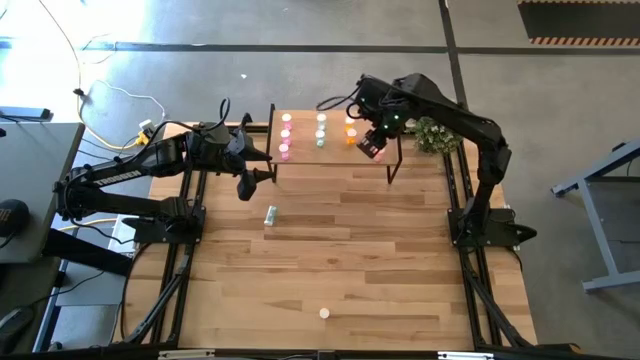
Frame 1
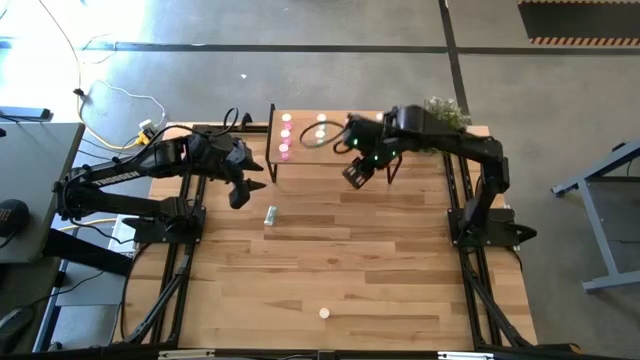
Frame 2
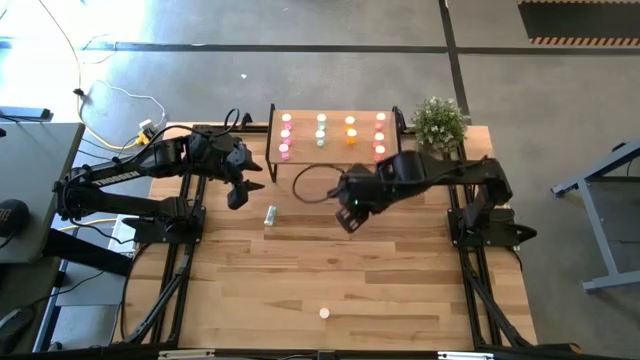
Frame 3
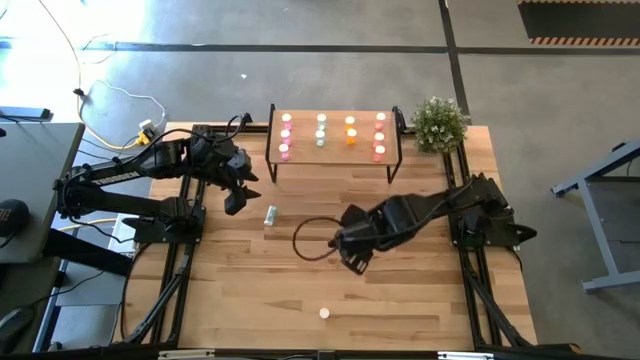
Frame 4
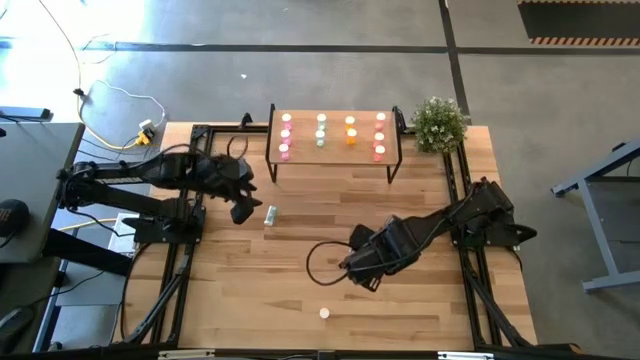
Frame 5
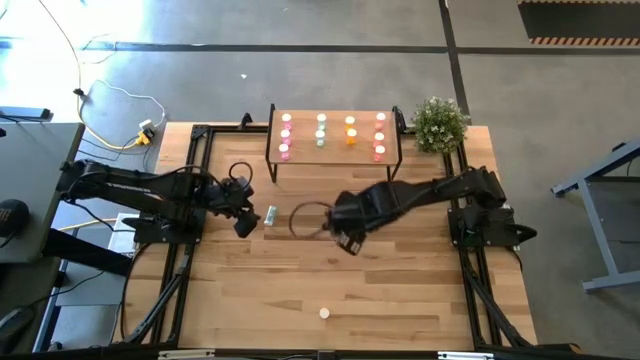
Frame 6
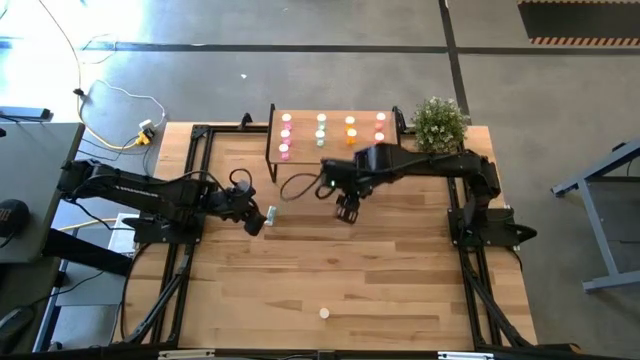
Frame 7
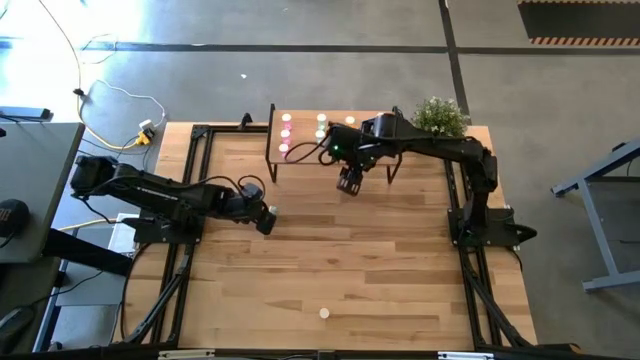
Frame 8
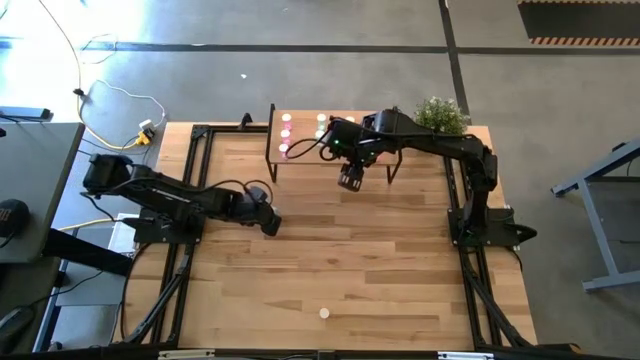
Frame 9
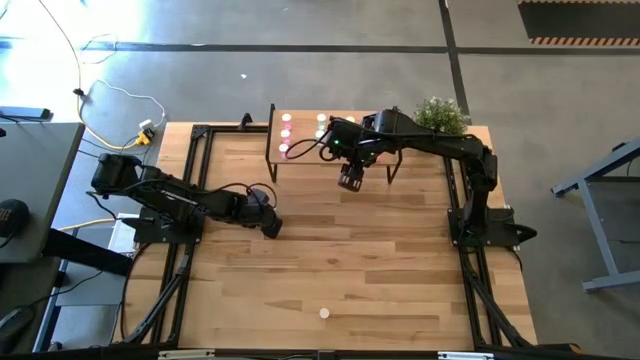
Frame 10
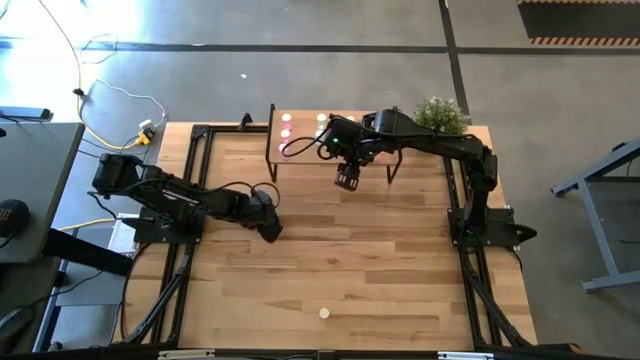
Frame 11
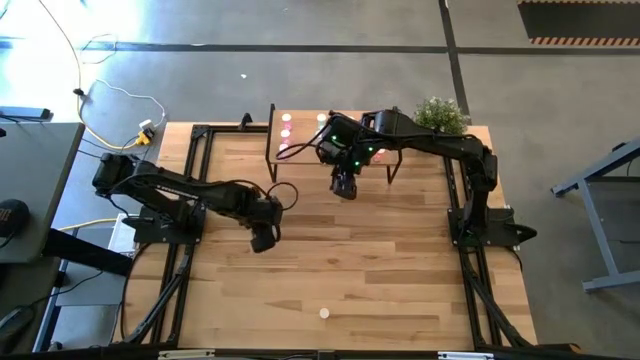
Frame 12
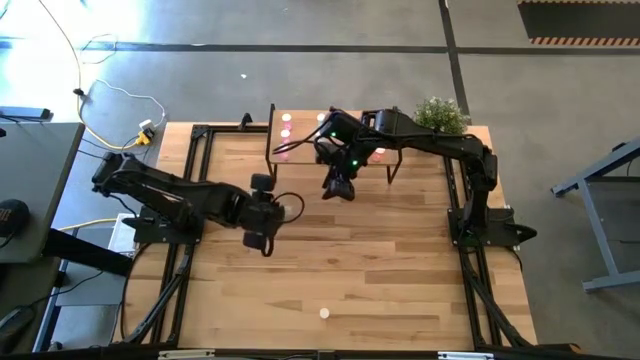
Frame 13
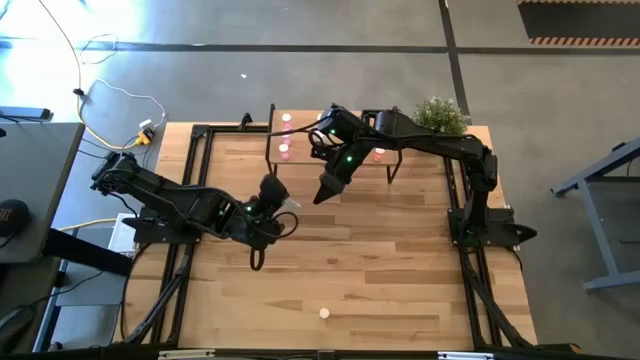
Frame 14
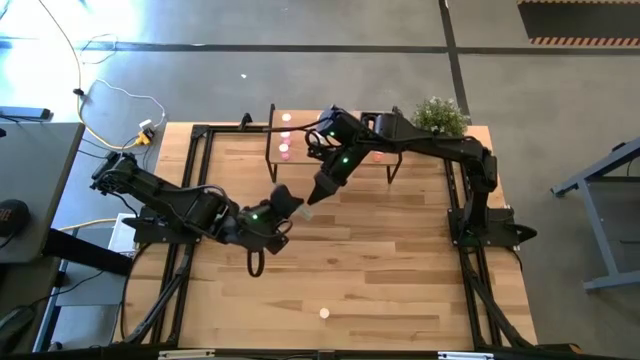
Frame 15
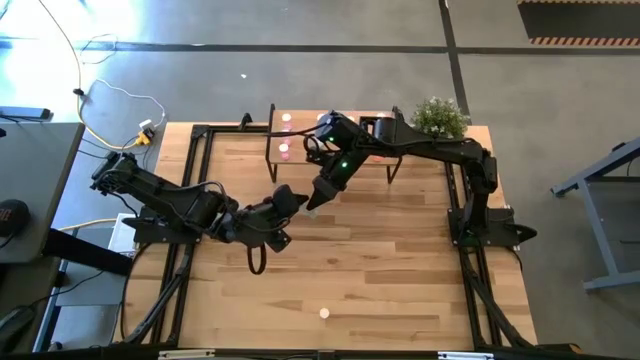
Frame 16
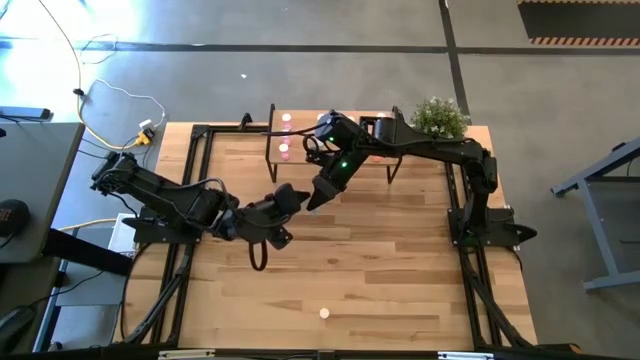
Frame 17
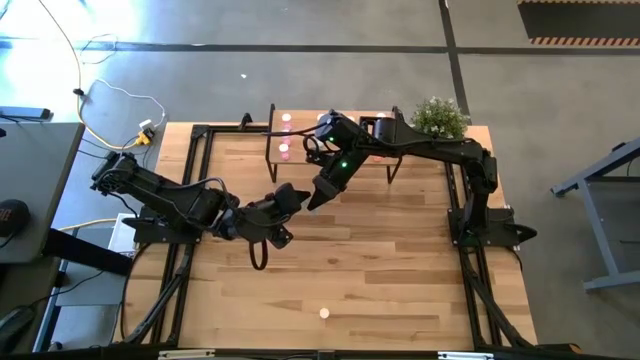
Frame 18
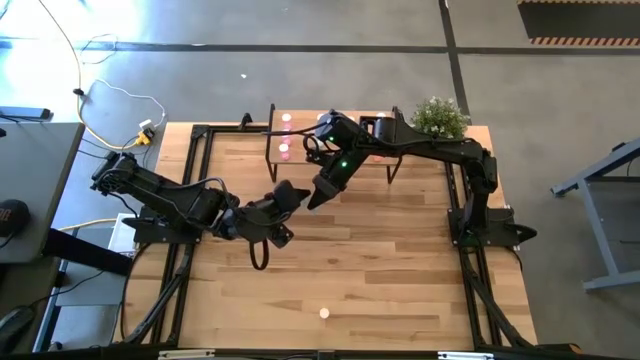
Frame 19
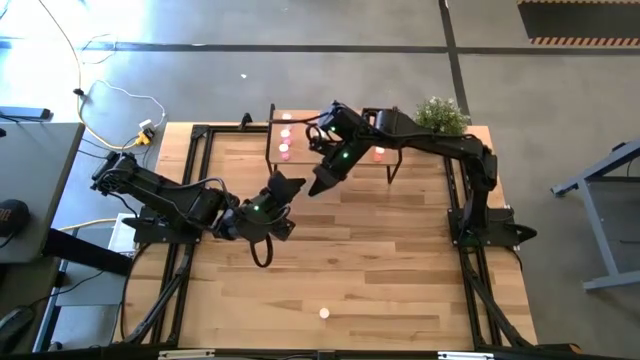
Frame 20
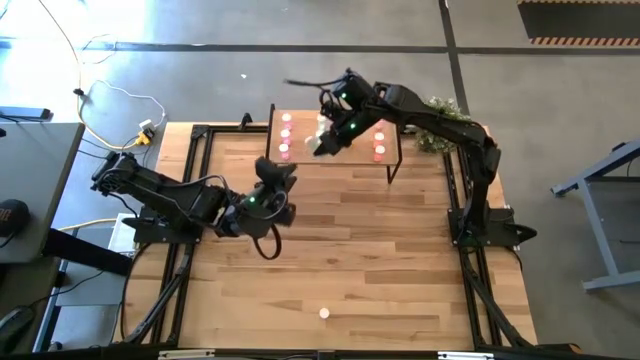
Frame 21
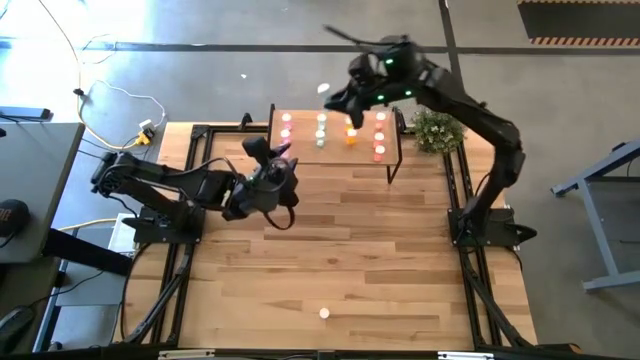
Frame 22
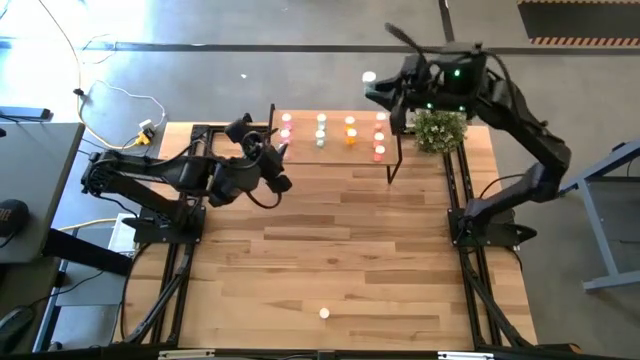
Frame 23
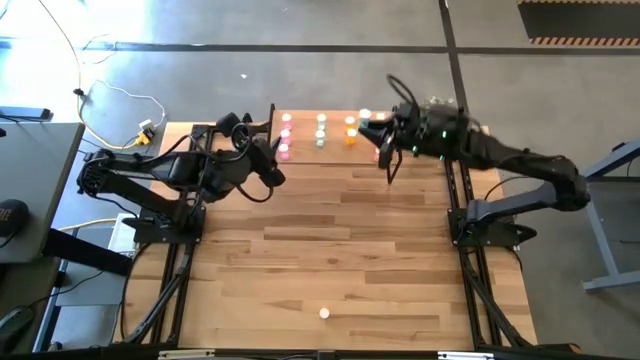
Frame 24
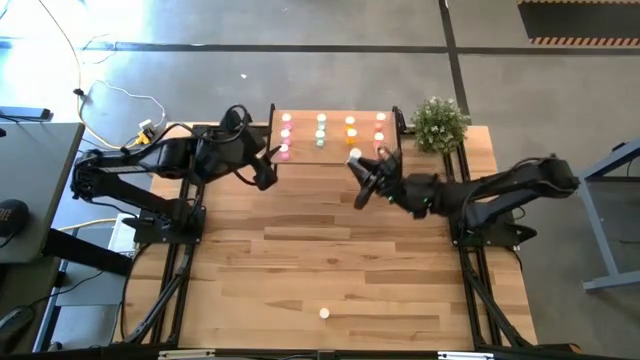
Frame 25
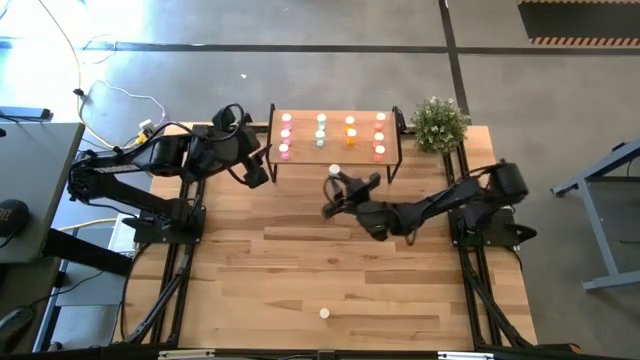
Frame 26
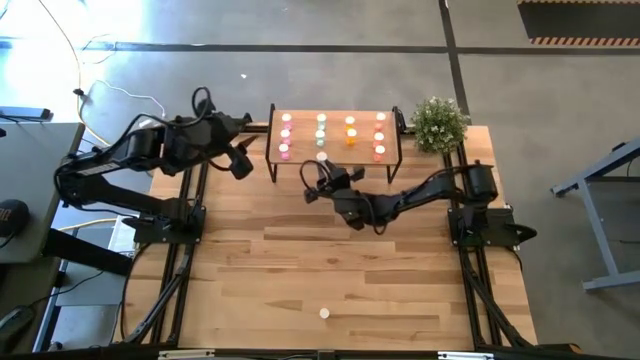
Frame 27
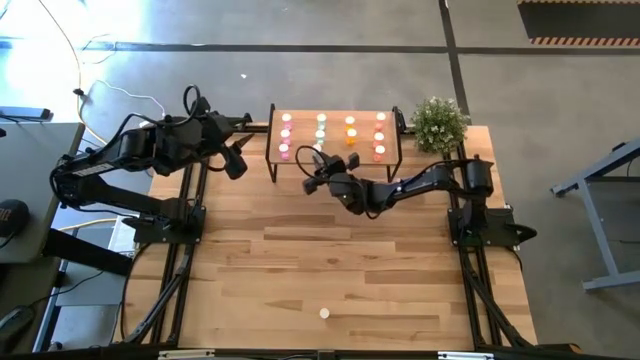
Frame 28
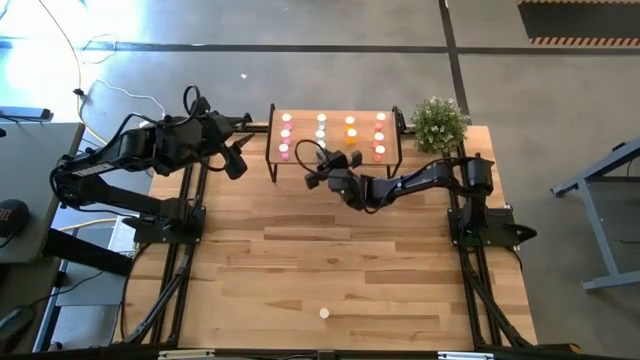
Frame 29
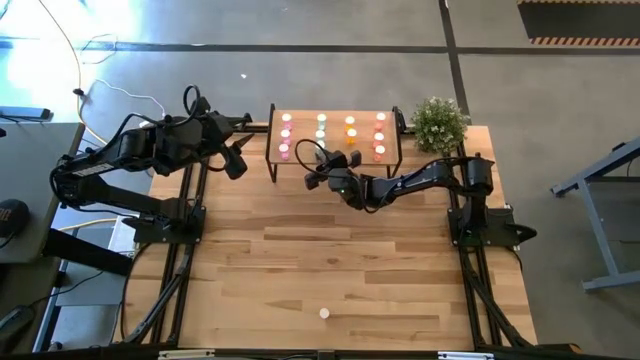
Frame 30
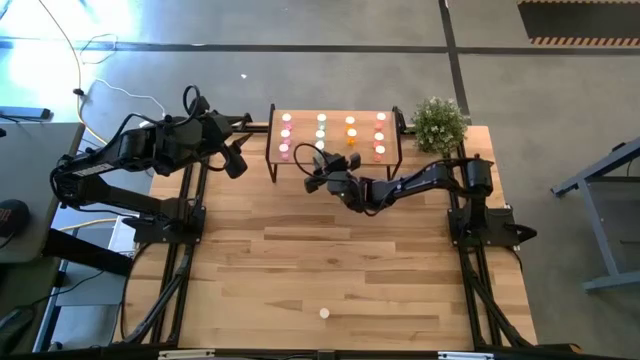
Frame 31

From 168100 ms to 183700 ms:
Task: Pick and place medicine bottles onto shelf by color
Put the blue pill bottle on the shelf aligned with the blue pill bottles

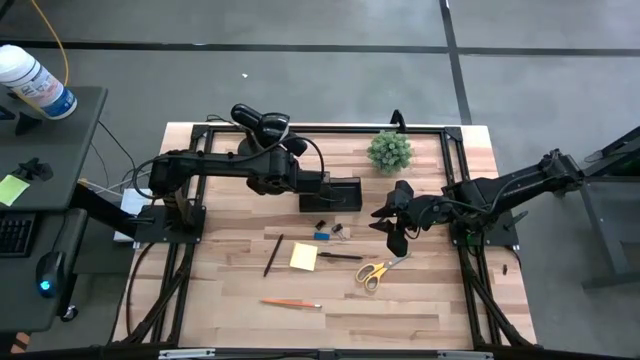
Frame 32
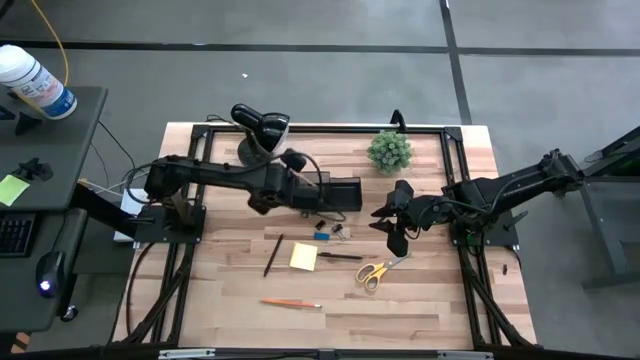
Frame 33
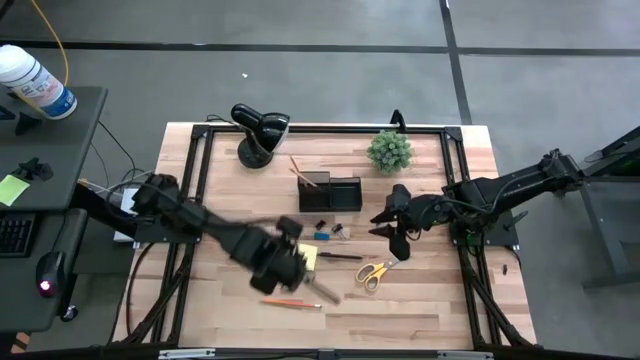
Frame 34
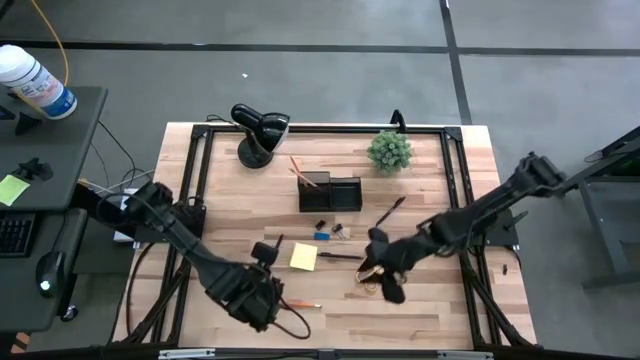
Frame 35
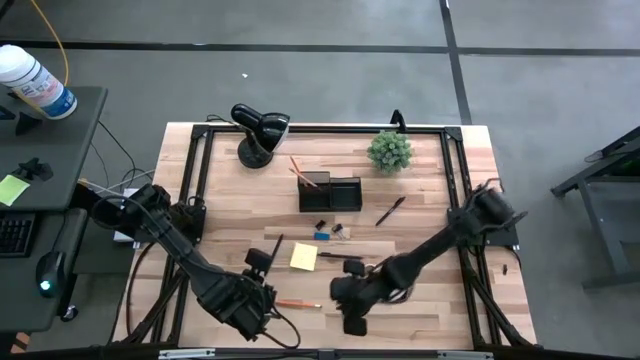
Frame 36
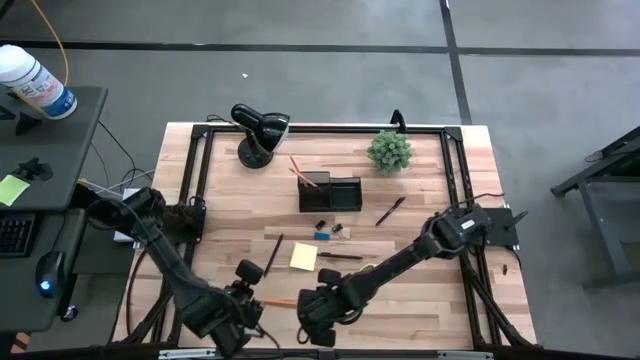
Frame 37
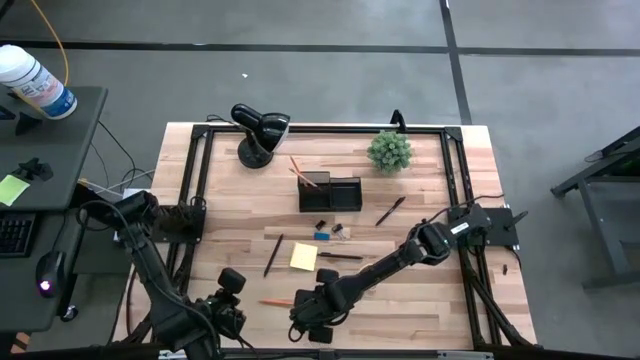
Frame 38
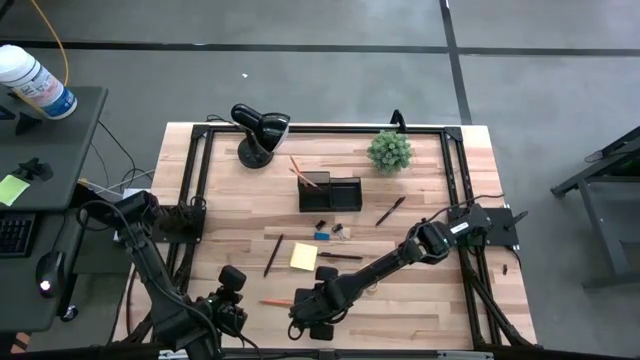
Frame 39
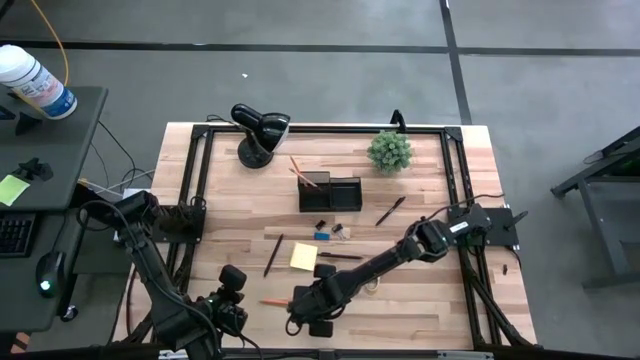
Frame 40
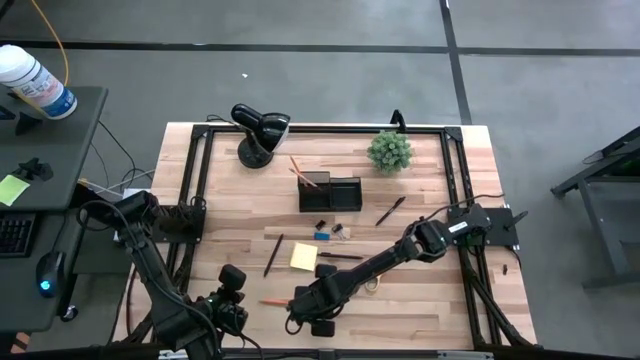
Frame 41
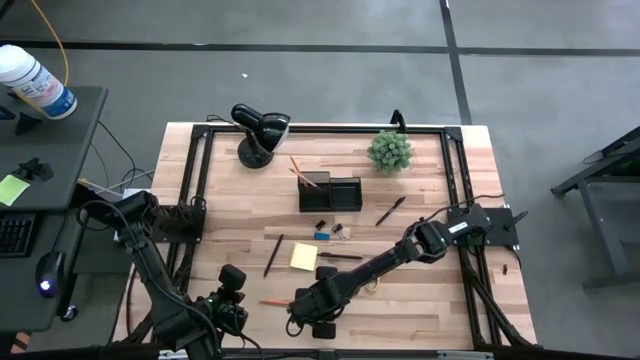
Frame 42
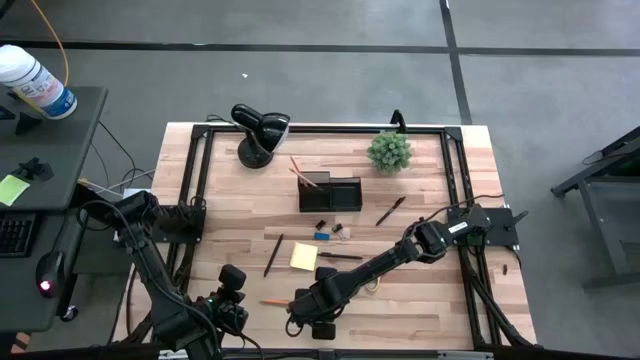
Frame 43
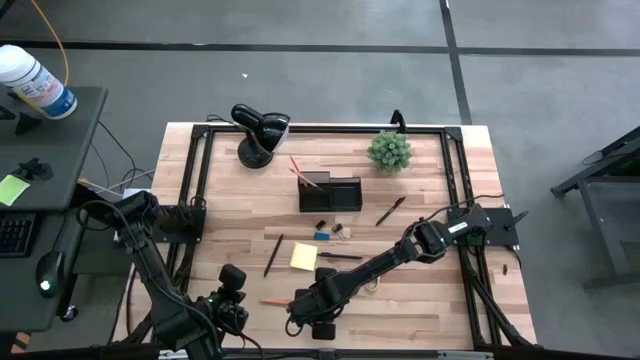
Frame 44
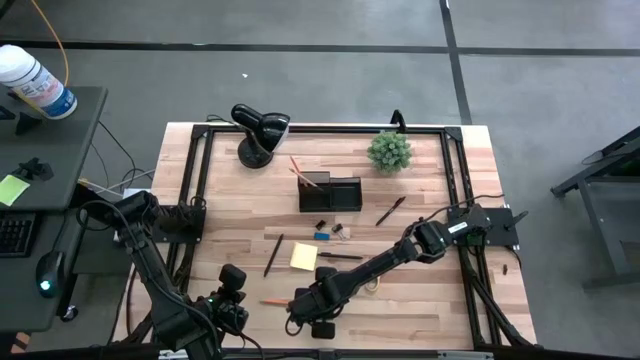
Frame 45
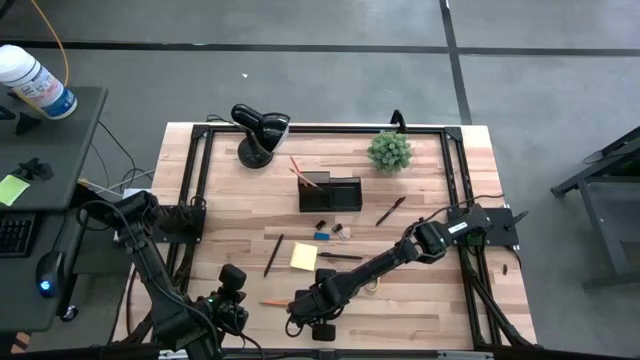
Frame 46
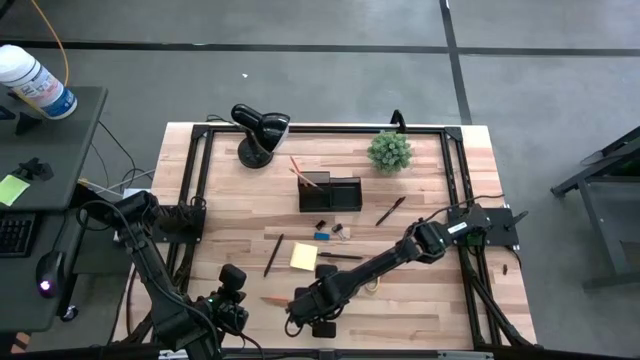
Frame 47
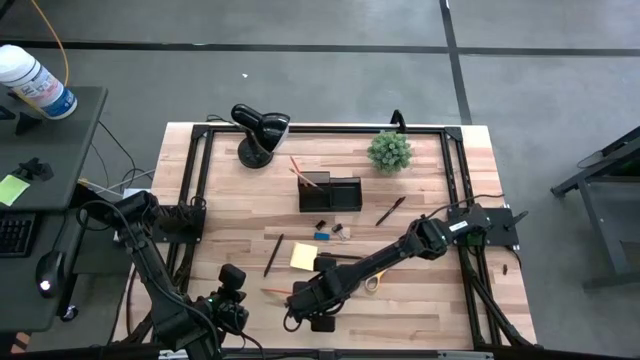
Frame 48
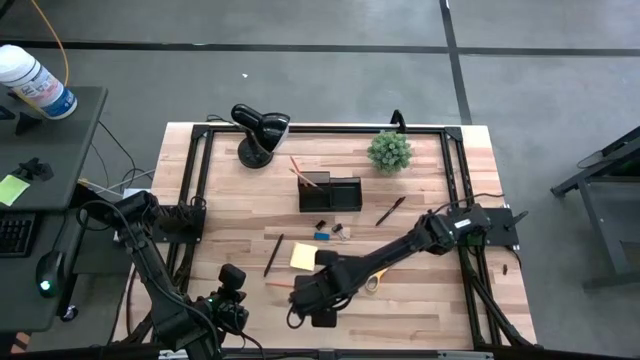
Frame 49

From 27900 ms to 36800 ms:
Task: Pick and place office supplies into organizer
Put the orange pencil into the black desk organizer
